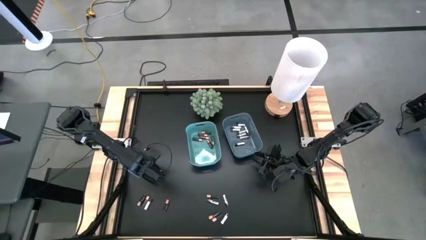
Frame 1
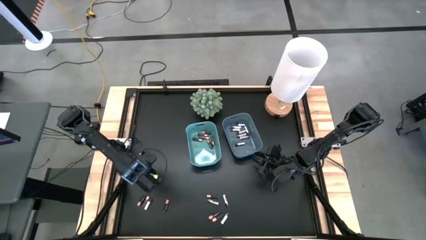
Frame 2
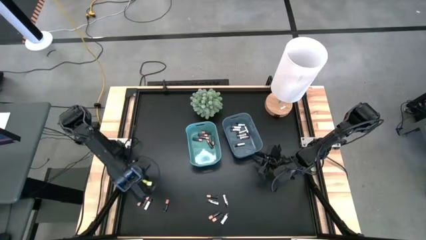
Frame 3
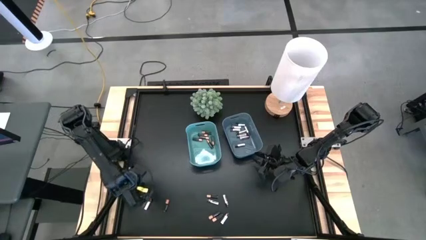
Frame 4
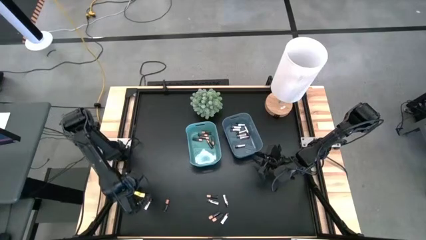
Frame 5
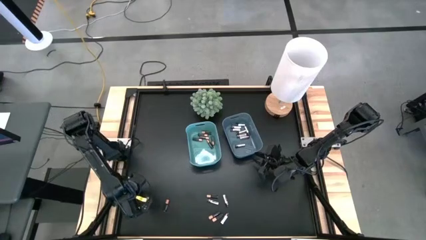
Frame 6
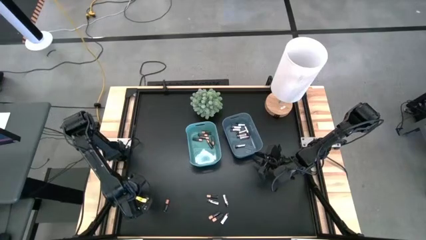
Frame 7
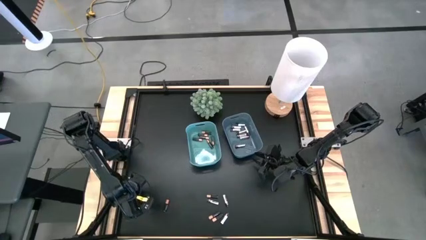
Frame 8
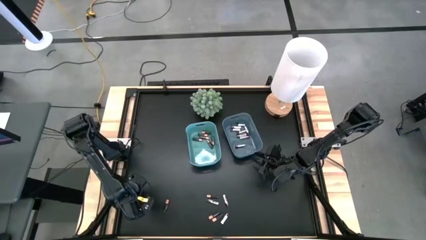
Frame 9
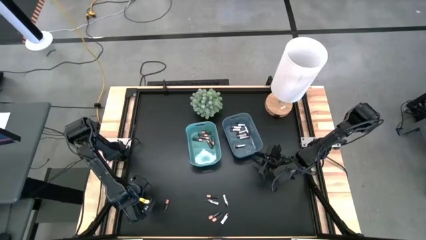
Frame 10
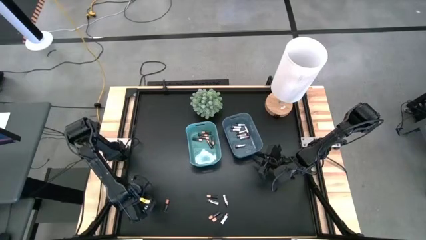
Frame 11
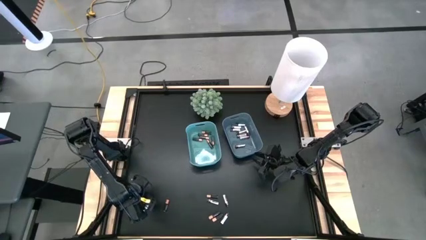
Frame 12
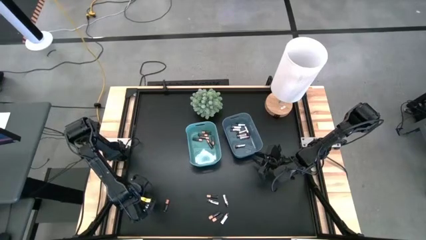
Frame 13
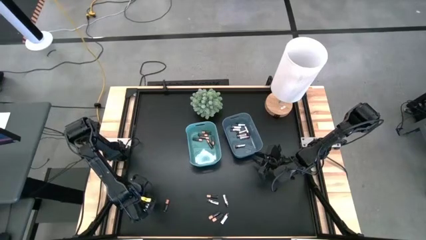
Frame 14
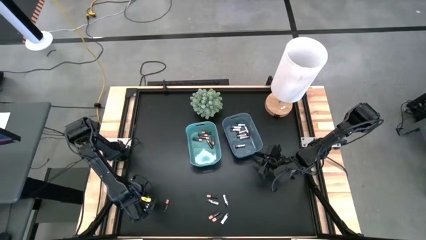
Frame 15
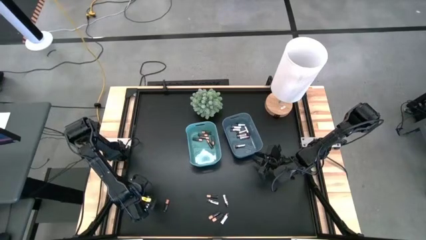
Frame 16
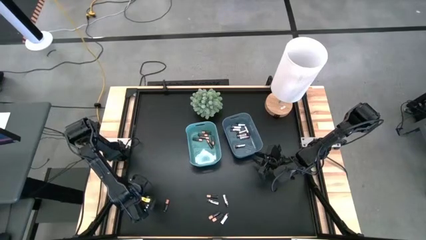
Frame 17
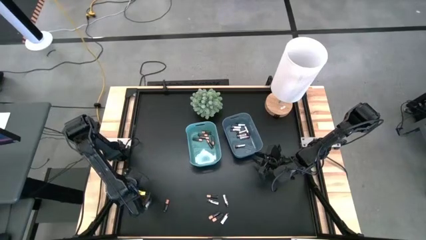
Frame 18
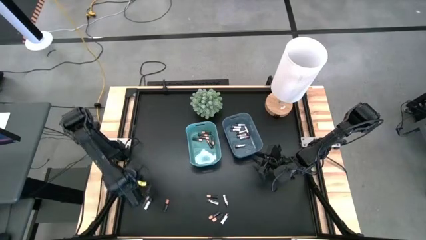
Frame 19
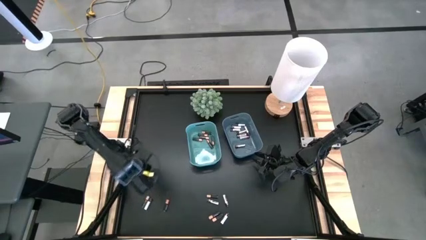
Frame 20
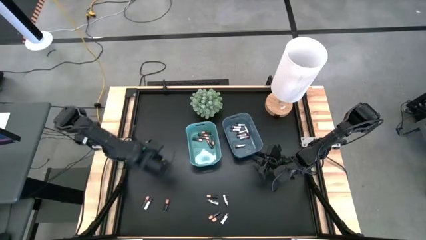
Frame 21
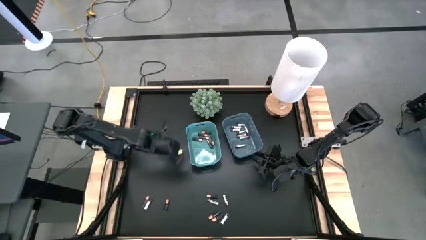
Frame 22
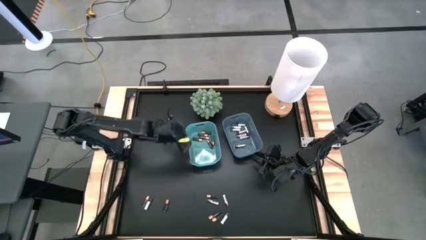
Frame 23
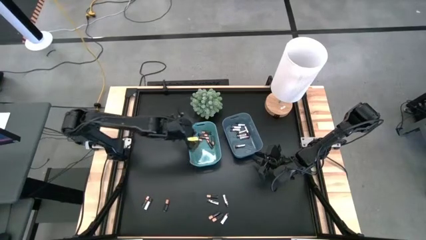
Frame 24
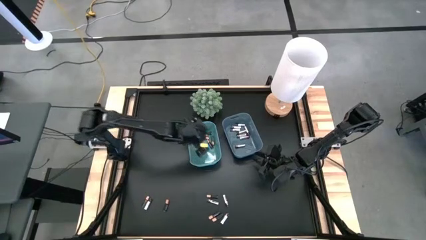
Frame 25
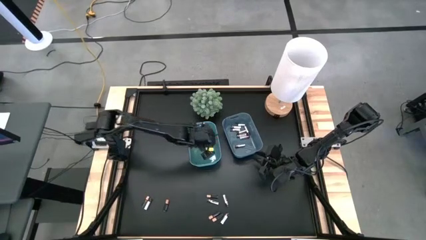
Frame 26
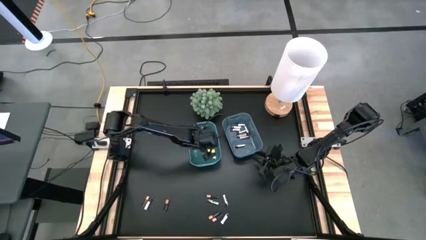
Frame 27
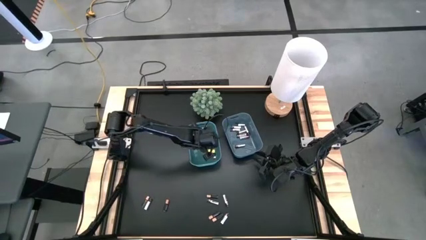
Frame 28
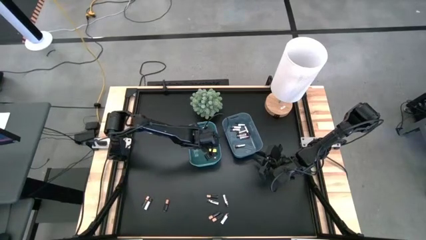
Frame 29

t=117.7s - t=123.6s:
Task: Sort batteries
Put the black battery into the green bin

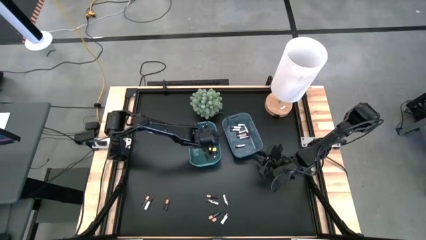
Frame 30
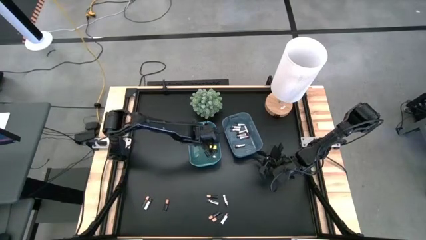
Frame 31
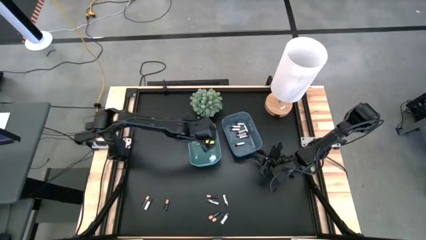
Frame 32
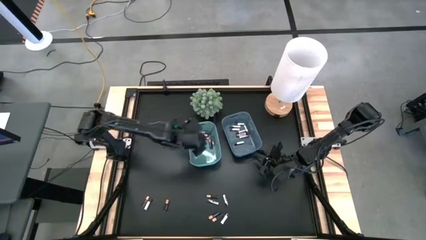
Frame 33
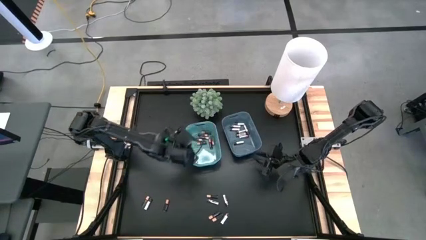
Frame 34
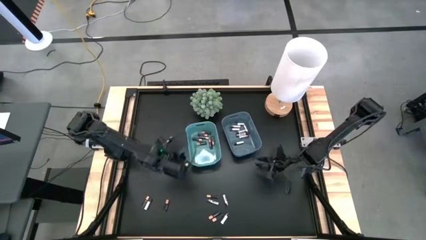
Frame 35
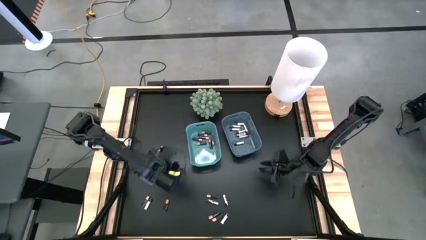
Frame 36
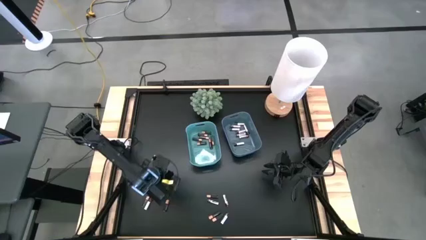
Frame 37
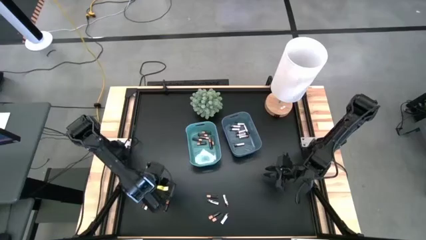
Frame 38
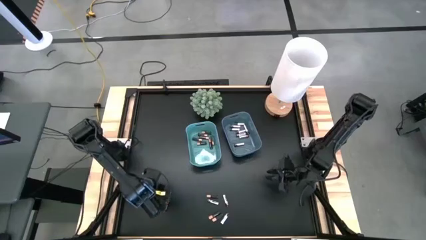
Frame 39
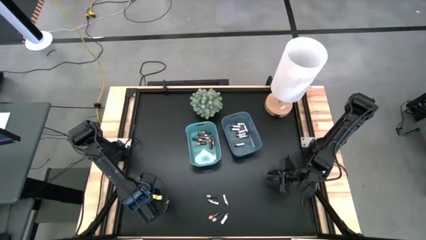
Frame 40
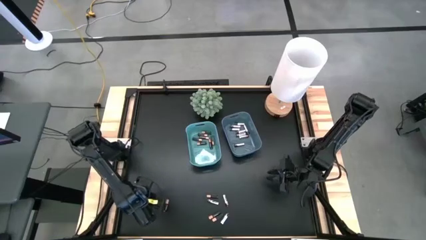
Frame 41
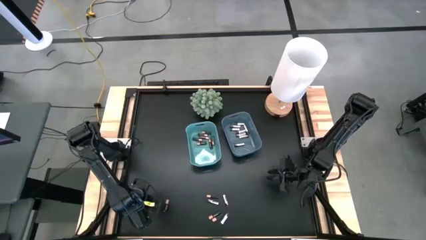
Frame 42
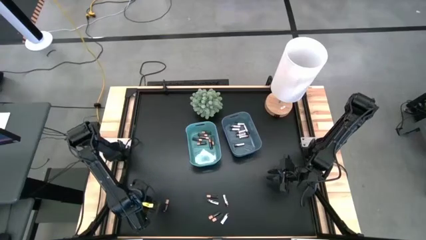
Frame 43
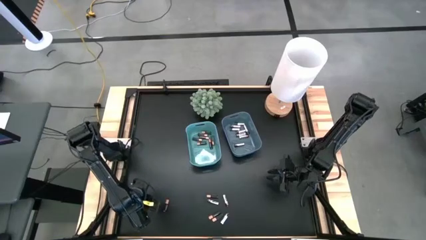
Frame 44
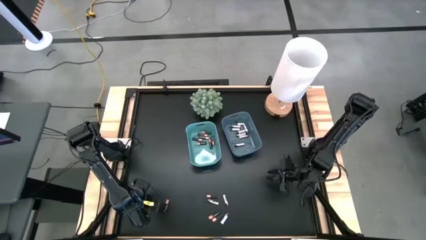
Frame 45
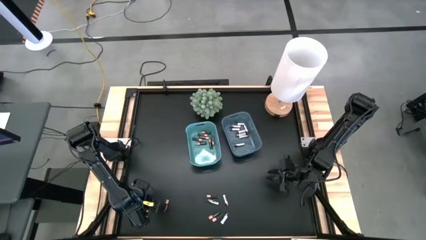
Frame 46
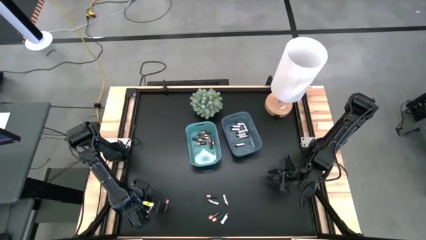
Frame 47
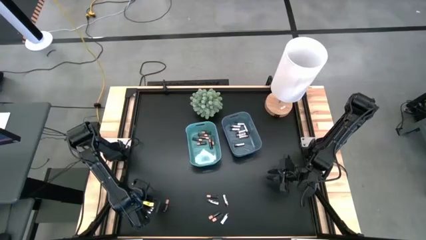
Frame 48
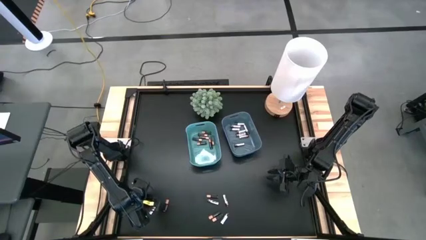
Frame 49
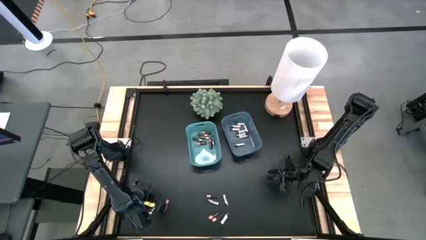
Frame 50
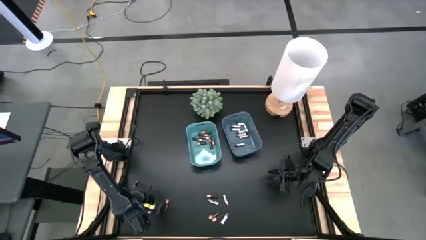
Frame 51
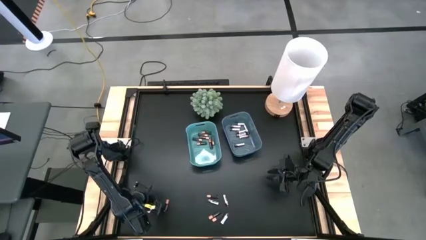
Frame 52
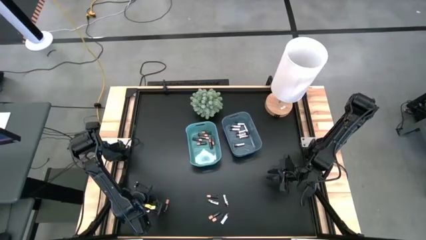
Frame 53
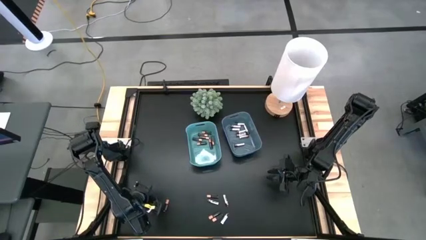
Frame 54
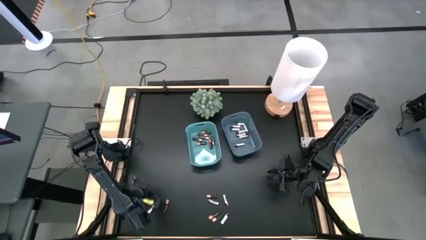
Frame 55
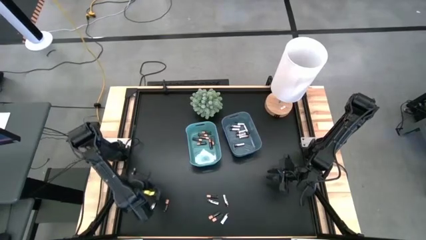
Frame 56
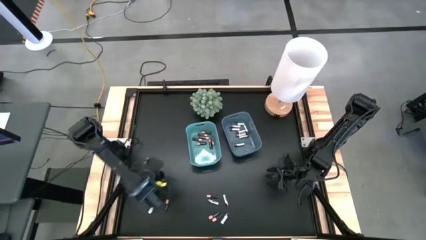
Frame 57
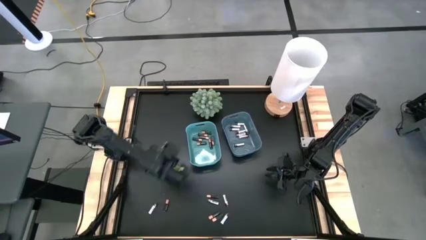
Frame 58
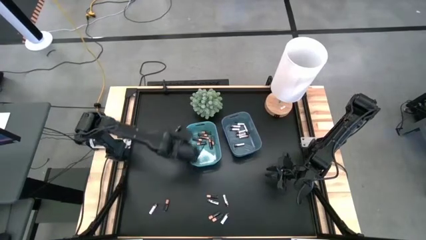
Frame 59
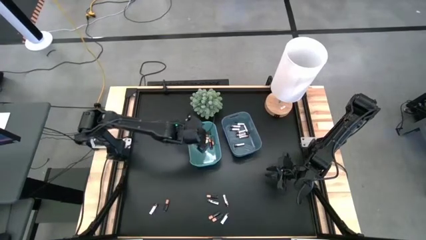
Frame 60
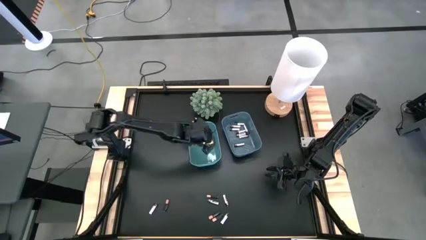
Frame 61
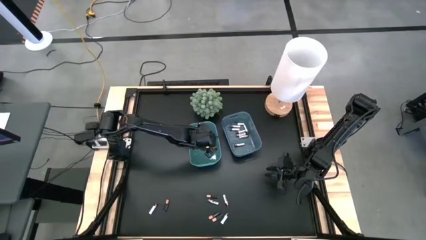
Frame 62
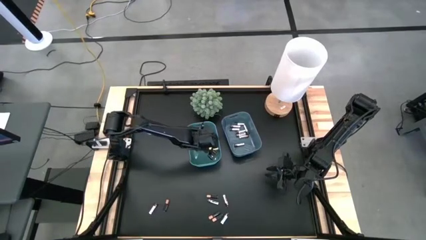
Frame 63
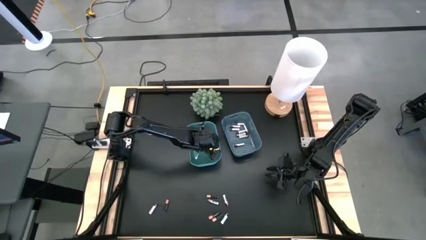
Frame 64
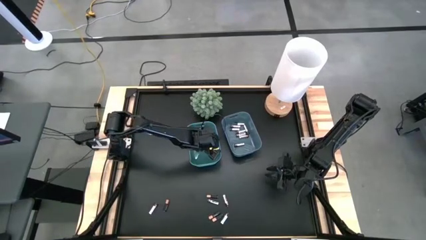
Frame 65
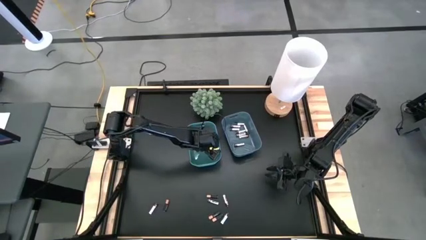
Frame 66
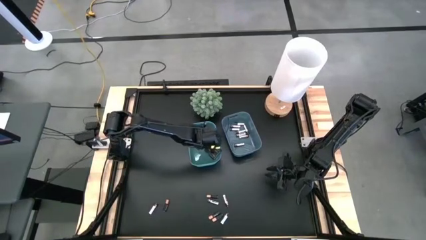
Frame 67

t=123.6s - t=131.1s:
Put the black battery into the green bin

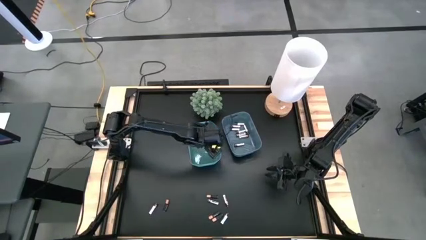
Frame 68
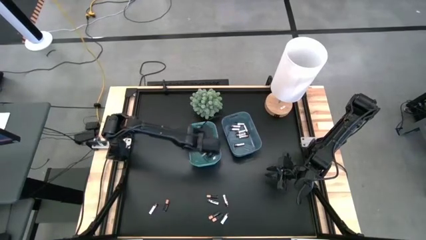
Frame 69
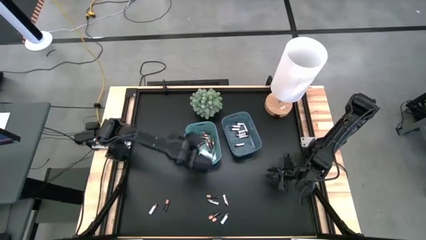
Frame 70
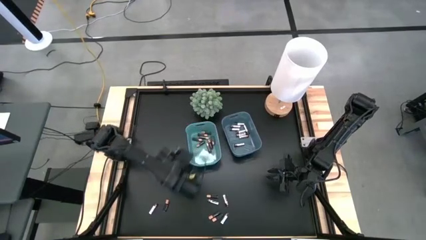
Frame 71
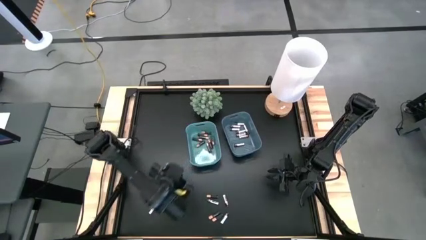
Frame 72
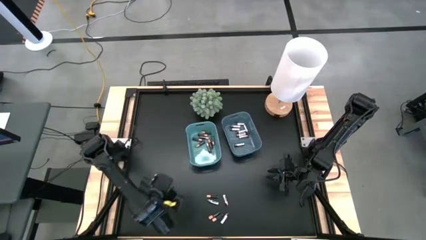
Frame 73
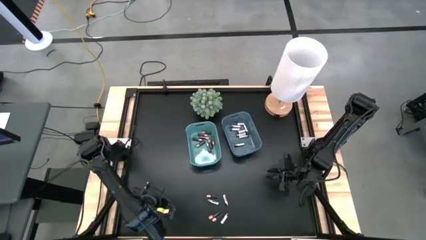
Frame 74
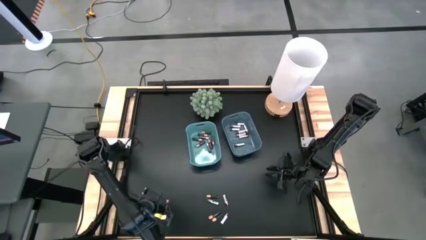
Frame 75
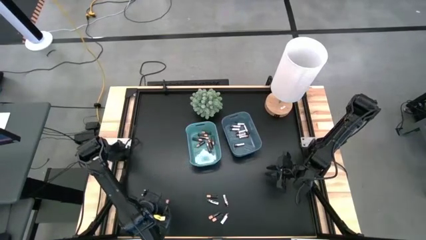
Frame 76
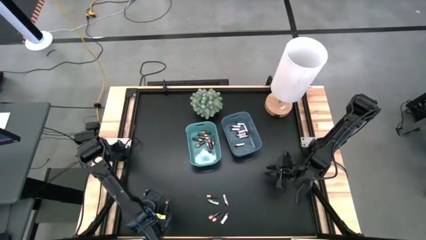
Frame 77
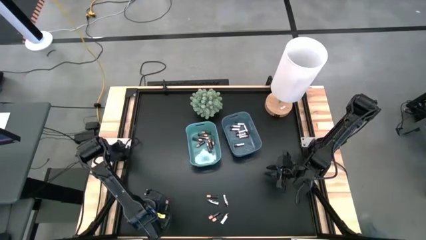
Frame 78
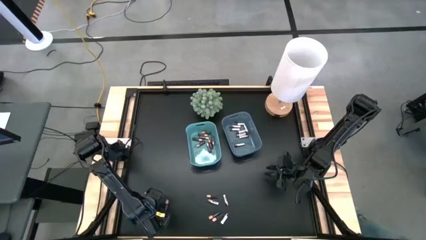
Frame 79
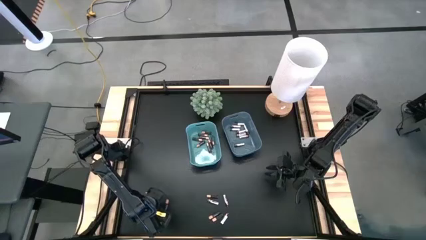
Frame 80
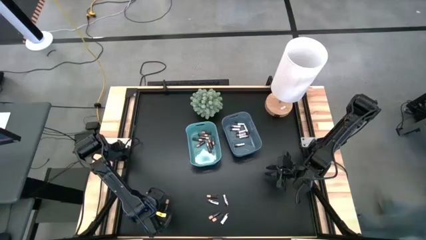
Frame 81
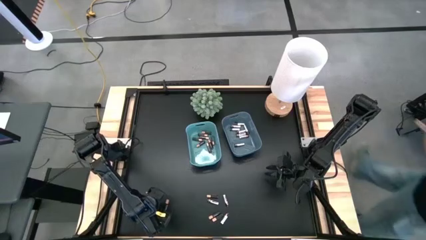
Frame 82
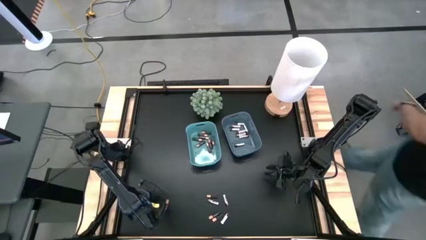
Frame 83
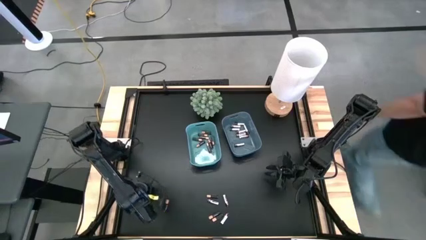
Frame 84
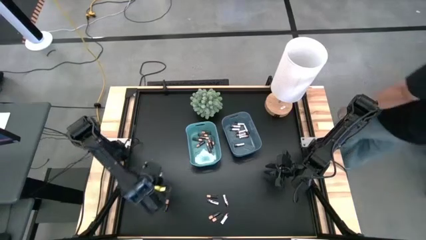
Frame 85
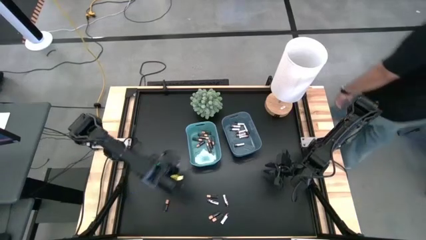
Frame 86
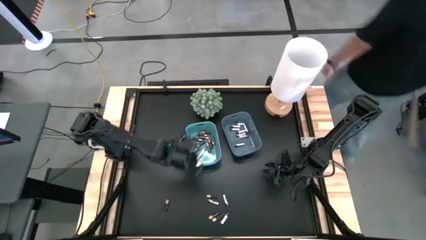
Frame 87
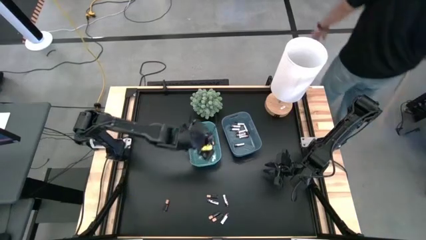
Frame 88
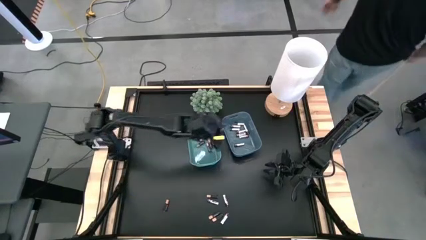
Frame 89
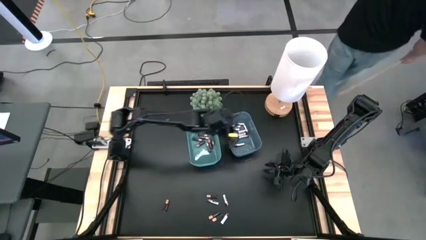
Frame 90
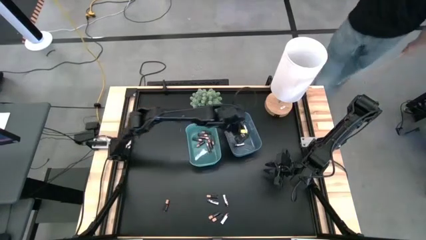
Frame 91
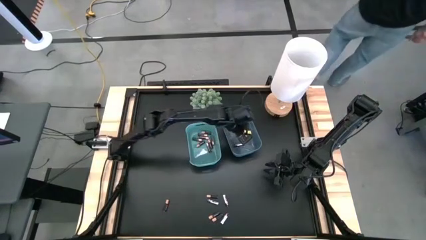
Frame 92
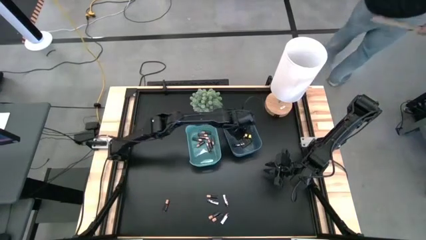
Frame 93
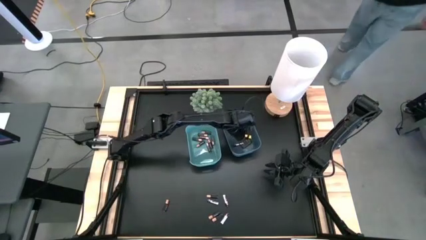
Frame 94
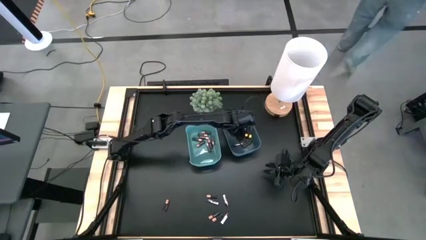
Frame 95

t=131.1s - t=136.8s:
Put the white battery into the blue bin
